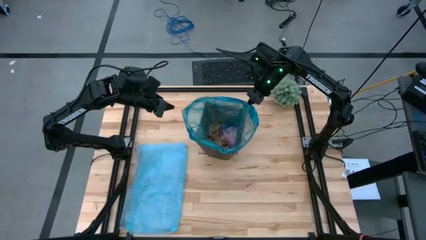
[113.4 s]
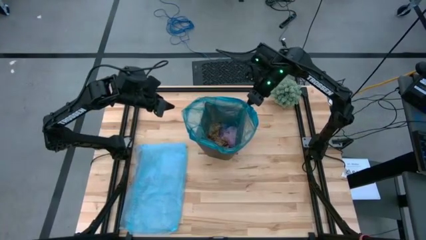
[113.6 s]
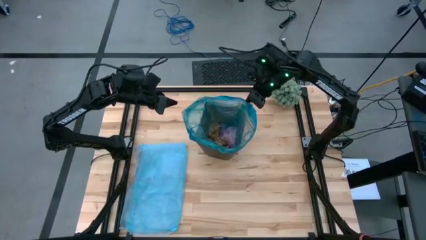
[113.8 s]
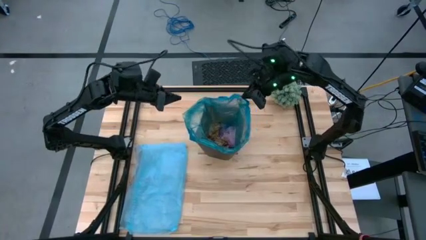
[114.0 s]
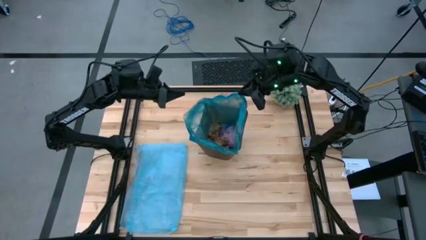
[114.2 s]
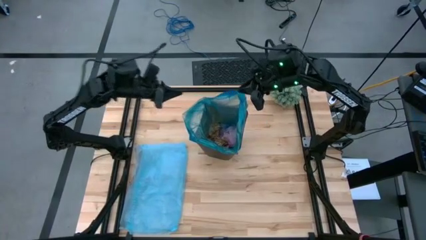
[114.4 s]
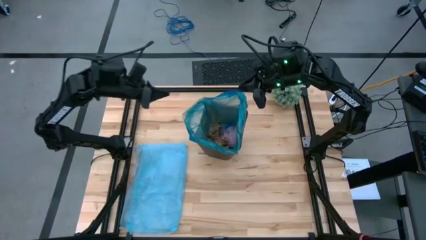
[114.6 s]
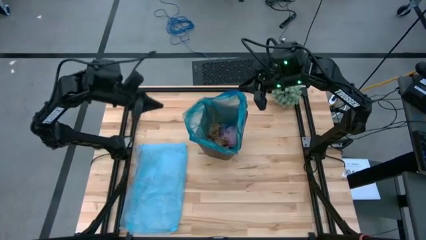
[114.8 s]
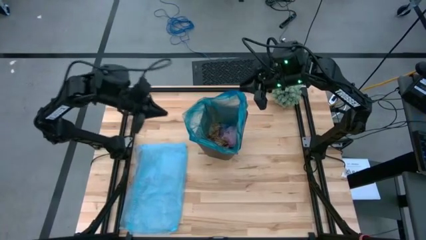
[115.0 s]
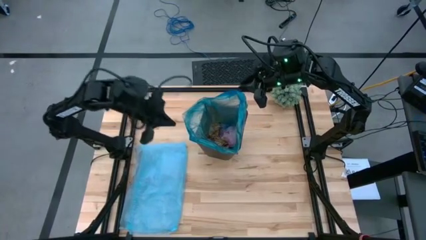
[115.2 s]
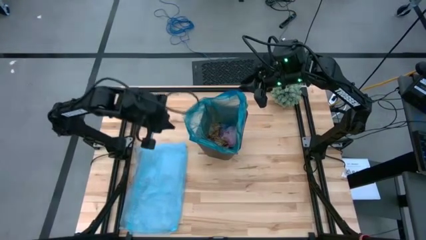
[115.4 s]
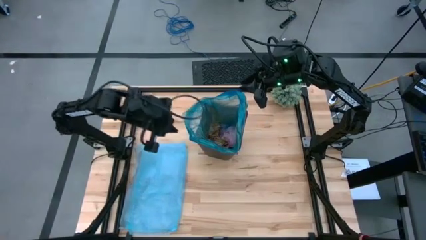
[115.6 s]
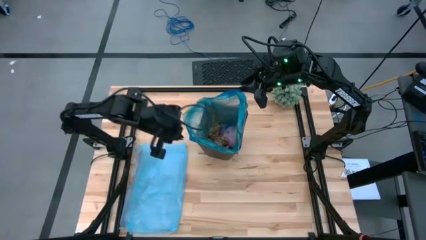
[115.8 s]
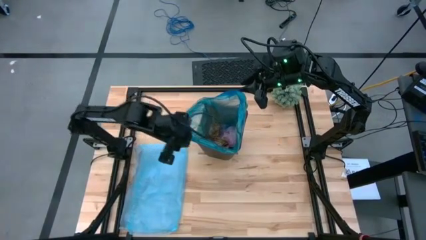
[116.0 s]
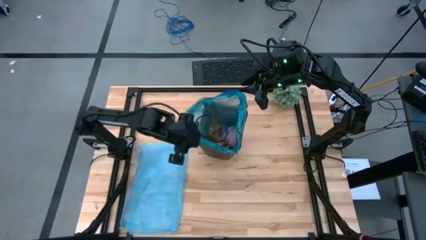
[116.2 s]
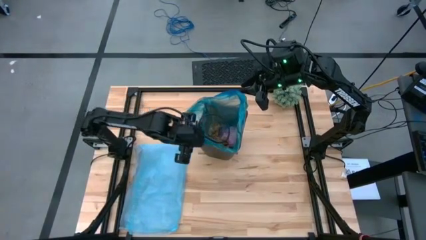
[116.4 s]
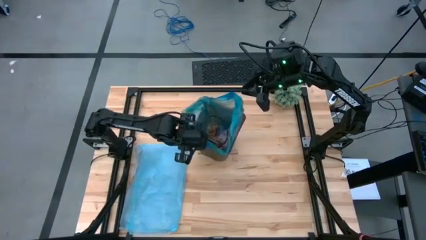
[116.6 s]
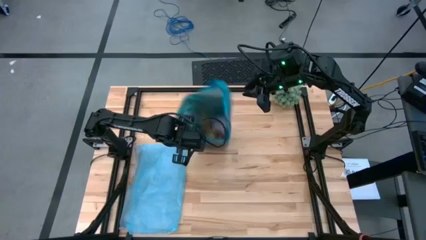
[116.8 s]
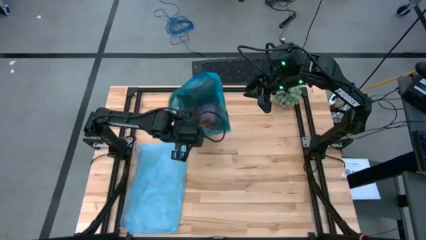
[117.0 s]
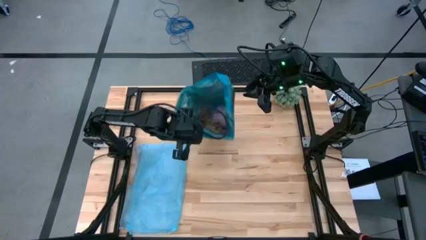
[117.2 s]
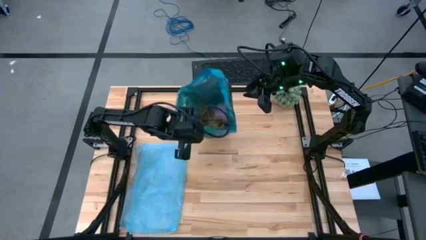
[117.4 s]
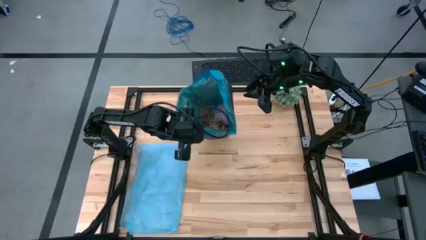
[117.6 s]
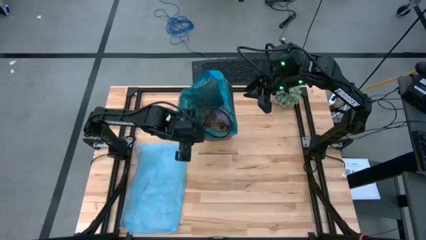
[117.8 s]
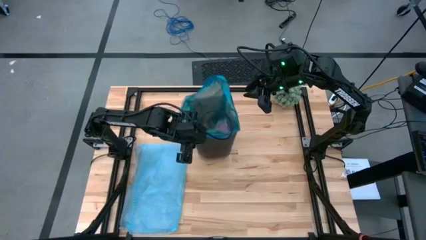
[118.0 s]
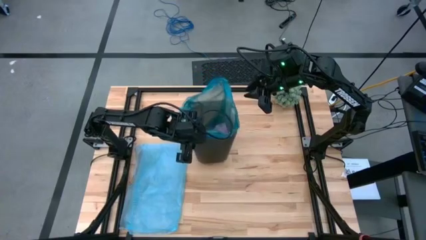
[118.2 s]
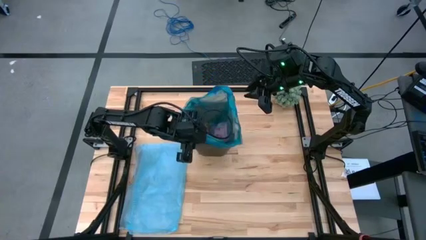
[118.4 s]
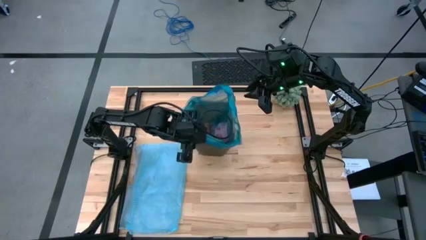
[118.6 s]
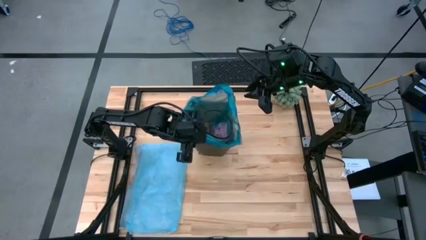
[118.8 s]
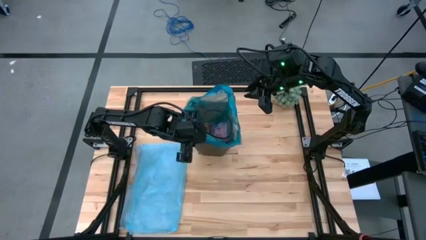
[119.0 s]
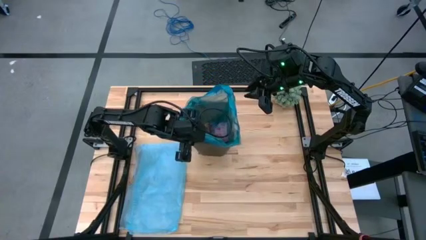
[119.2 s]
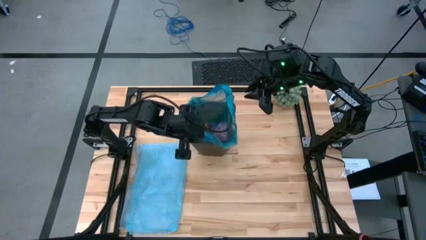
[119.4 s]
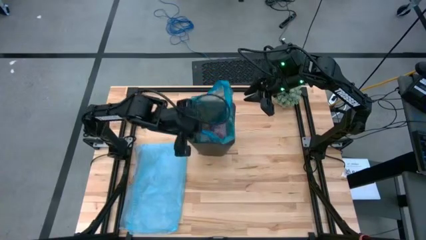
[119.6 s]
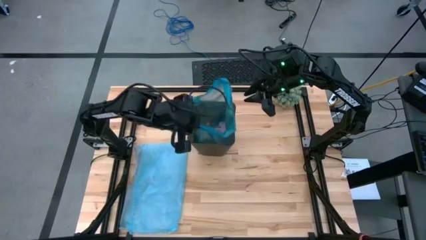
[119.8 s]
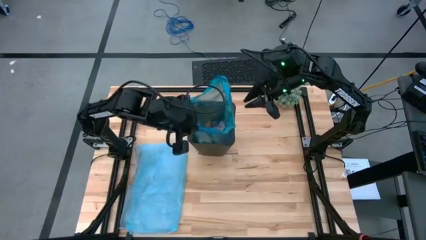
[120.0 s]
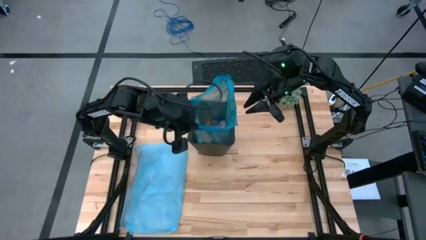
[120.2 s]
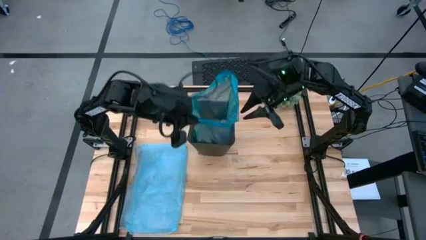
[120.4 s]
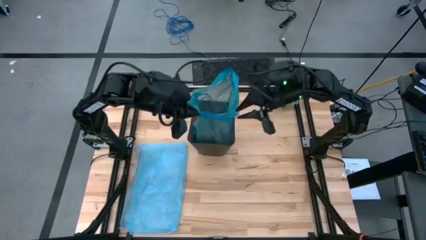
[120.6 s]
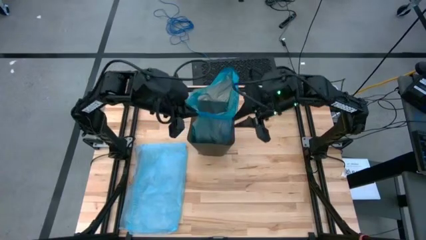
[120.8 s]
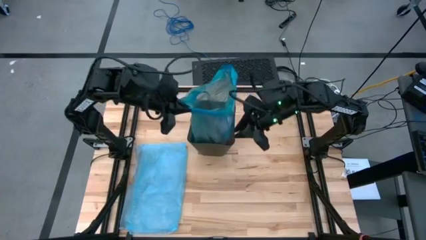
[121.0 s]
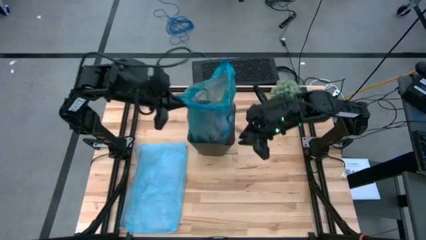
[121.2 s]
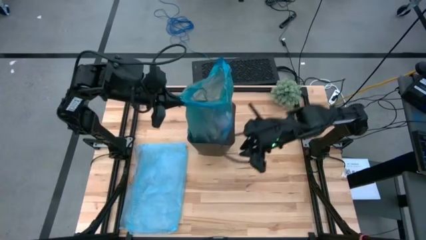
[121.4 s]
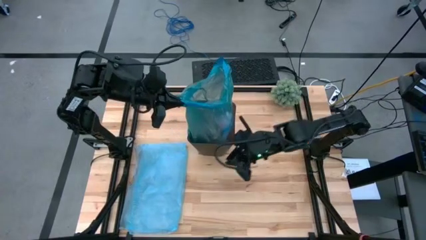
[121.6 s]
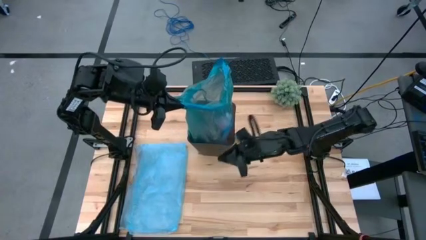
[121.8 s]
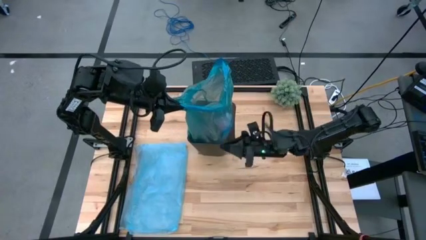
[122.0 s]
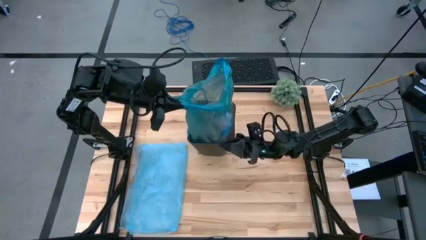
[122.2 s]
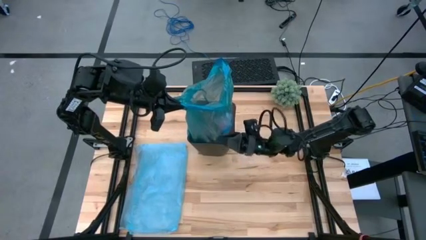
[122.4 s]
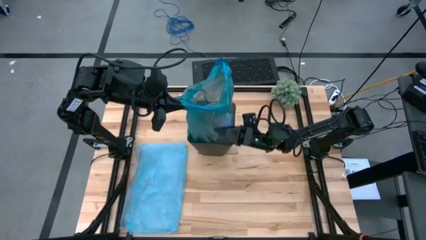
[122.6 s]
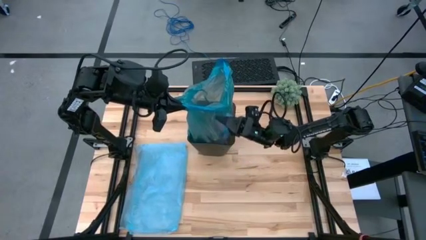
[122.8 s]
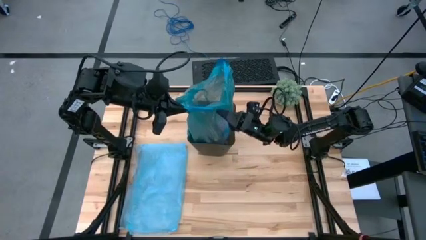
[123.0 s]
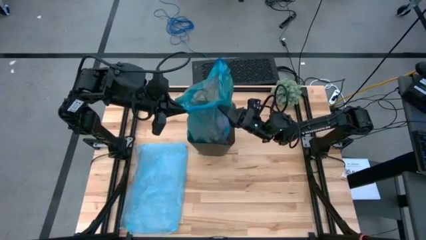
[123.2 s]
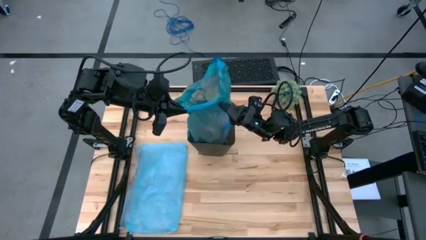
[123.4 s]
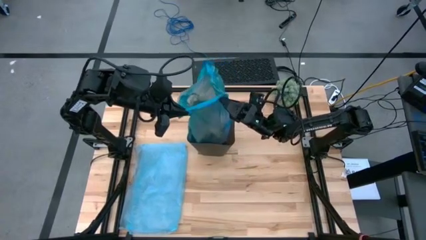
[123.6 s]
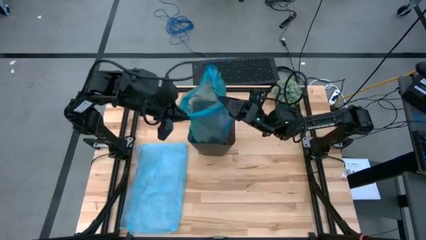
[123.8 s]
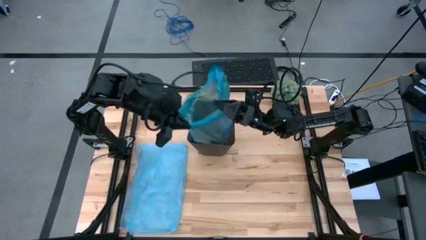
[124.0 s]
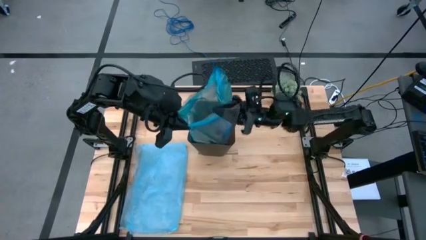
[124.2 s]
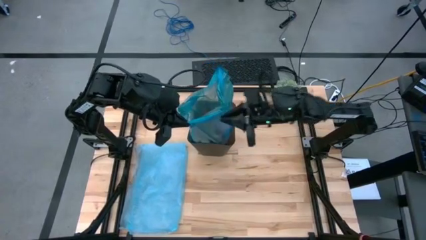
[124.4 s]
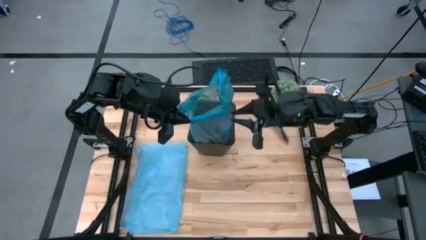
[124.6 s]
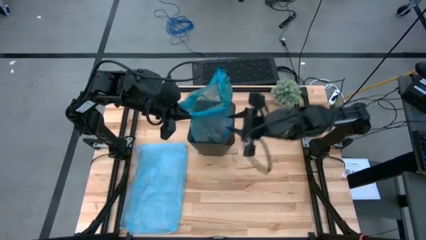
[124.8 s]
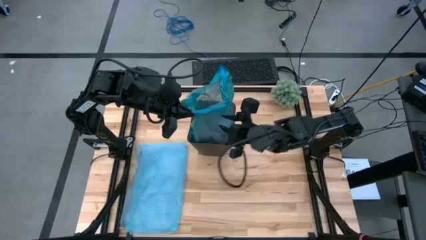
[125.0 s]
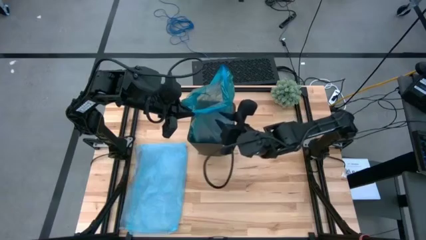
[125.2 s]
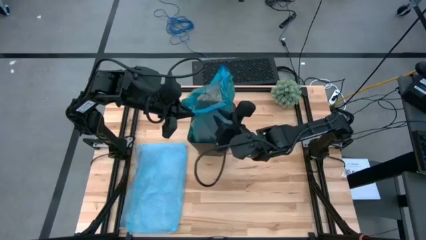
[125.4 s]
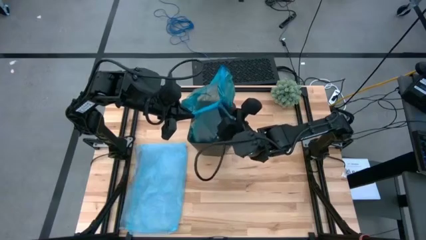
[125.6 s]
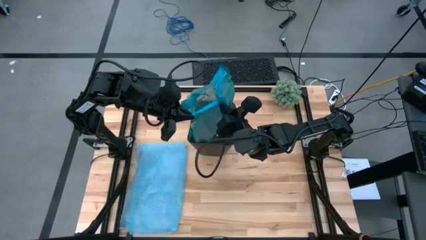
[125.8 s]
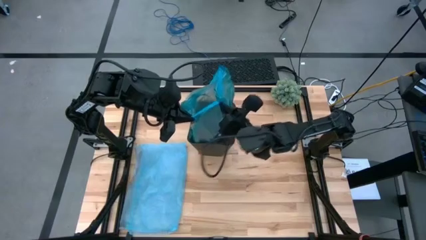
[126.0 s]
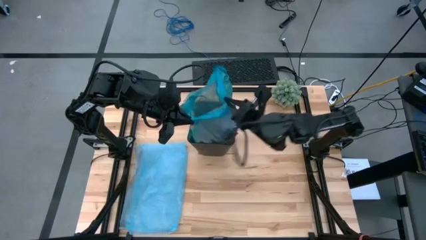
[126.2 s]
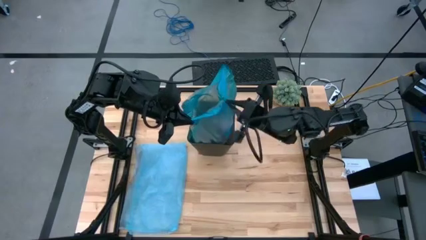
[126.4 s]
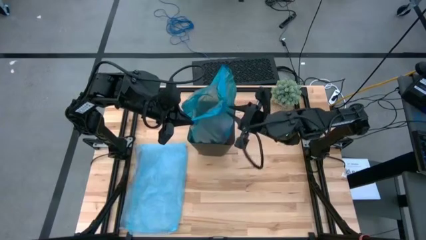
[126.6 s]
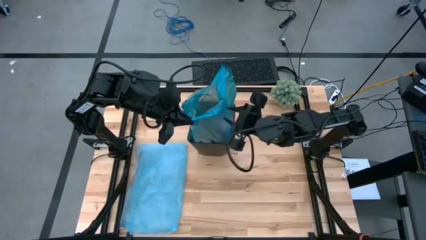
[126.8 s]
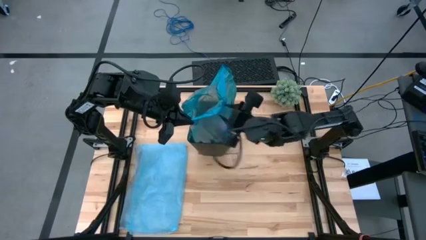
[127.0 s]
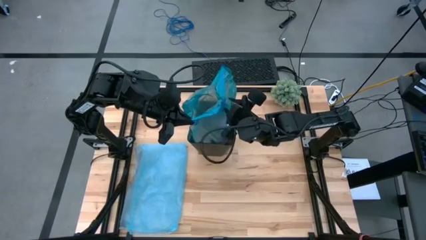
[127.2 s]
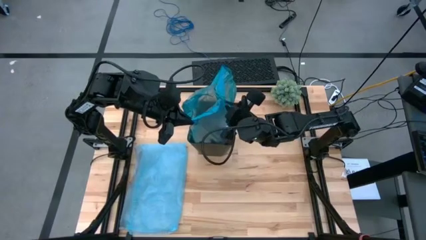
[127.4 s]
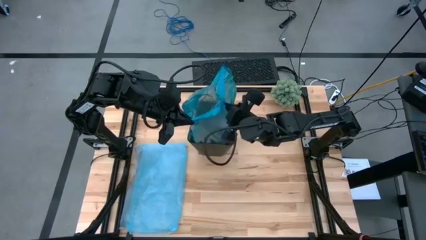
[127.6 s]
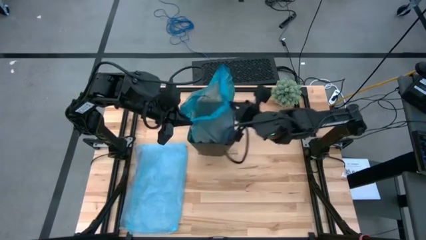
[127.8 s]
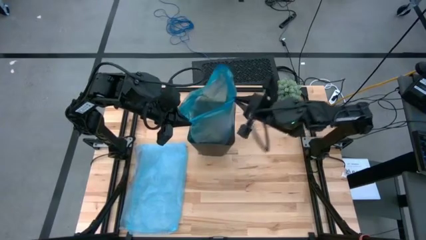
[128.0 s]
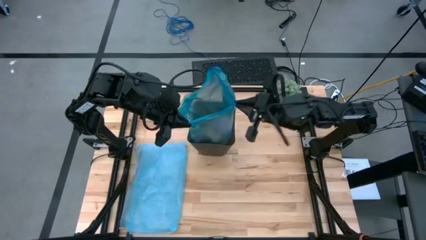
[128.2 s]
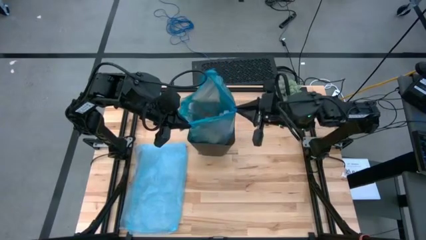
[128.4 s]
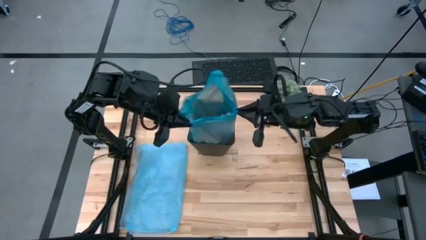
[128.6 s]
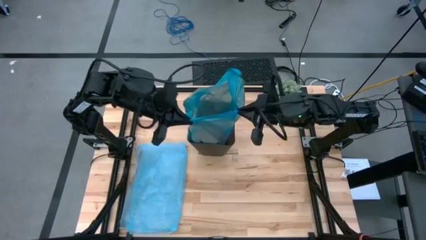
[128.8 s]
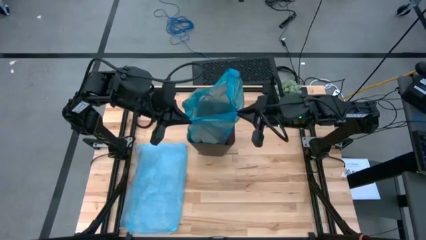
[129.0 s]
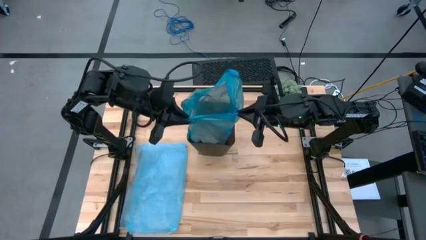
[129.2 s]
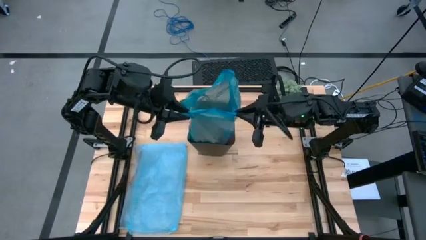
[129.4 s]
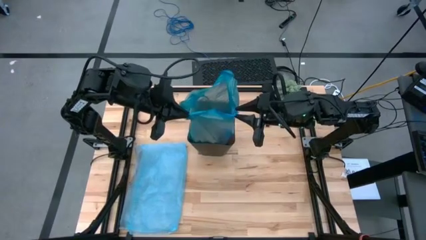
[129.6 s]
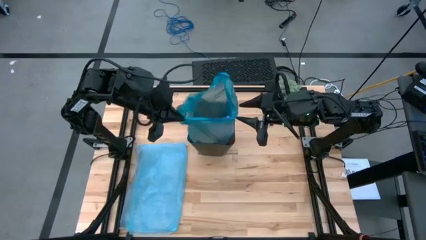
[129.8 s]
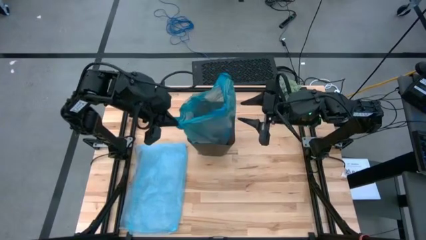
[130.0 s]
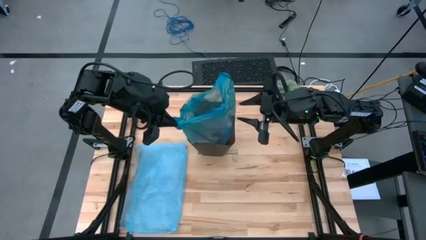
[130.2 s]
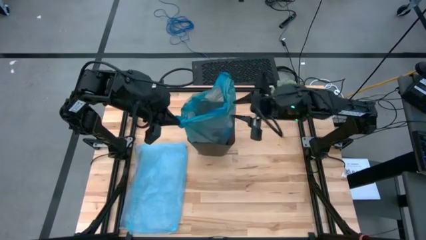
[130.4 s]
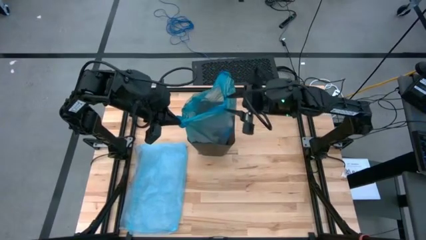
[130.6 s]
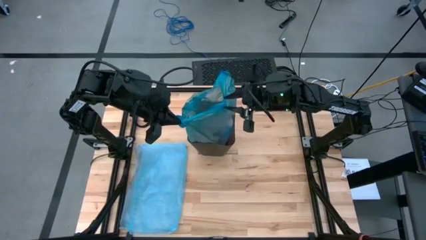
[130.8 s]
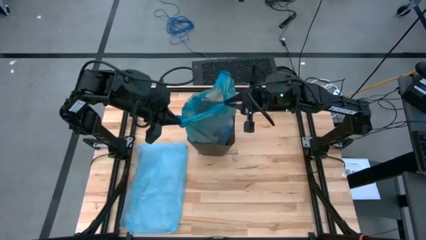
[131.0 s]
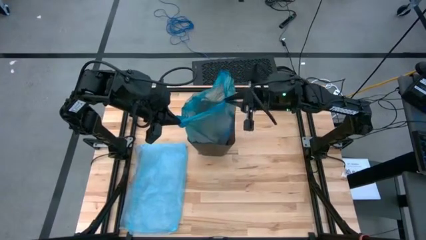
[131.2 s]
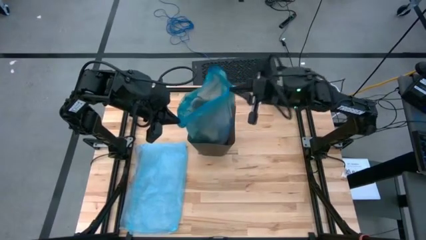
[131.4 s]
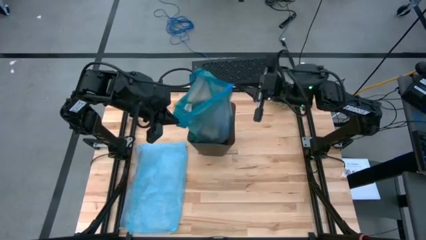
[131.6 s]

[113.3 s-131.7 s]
Task: place trash/remove bag and relplace
Remove the trash bag from the trash bin
